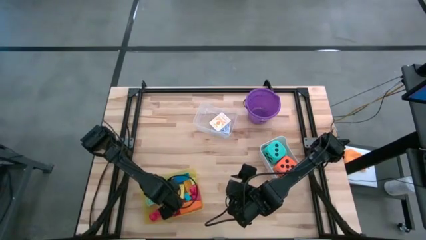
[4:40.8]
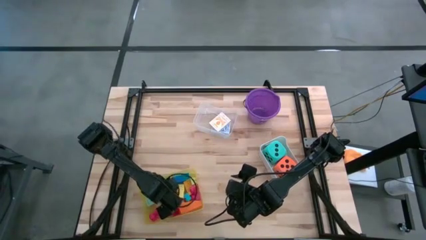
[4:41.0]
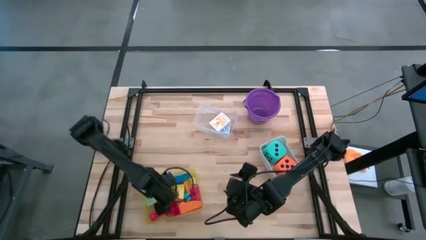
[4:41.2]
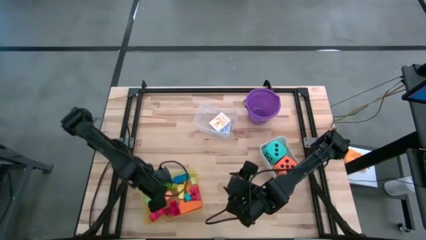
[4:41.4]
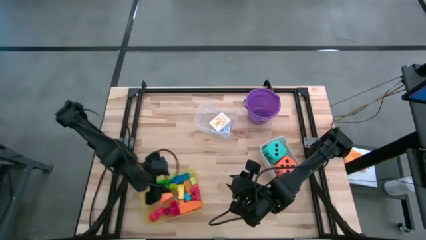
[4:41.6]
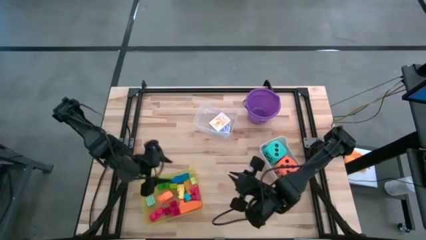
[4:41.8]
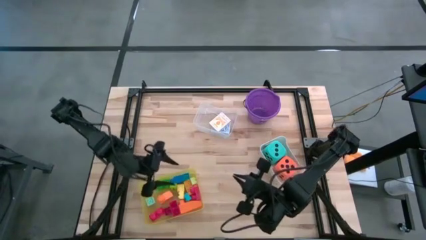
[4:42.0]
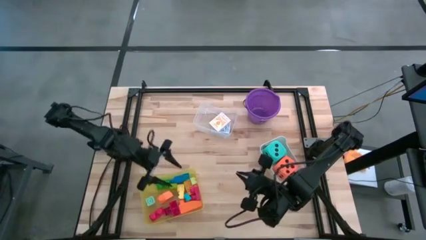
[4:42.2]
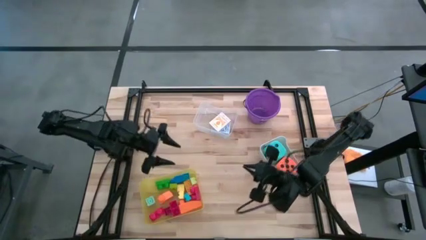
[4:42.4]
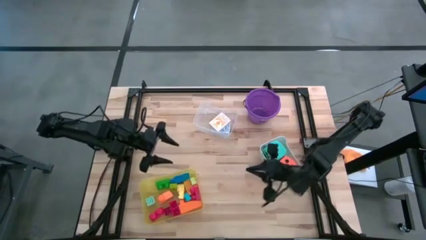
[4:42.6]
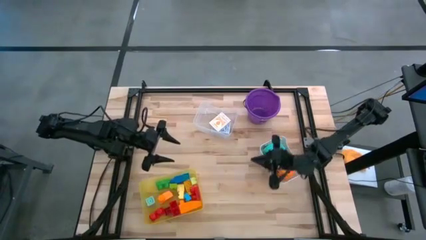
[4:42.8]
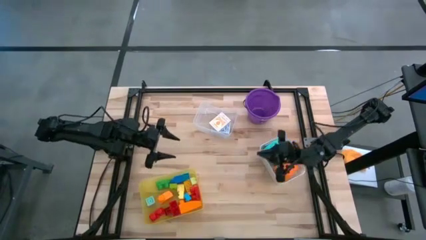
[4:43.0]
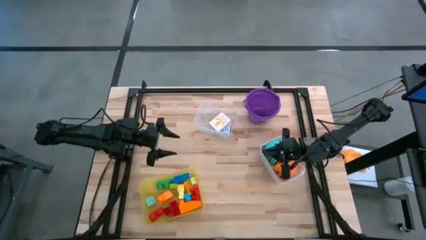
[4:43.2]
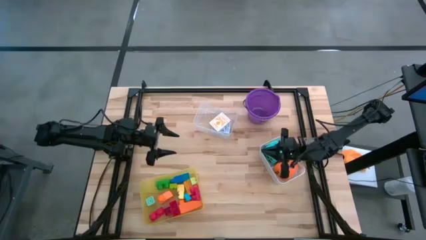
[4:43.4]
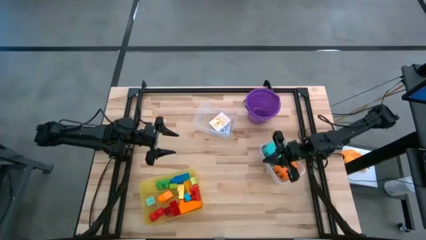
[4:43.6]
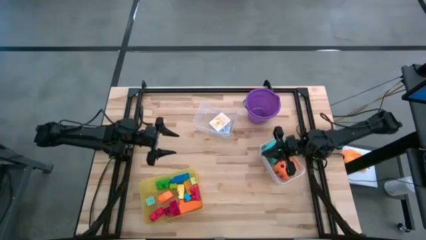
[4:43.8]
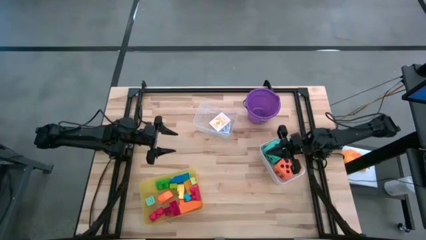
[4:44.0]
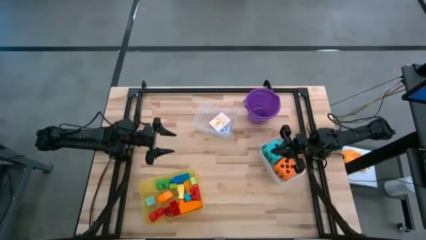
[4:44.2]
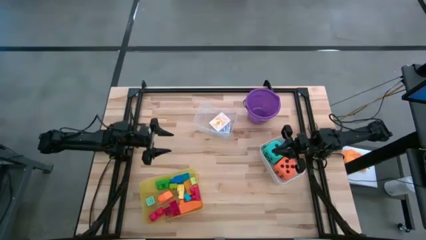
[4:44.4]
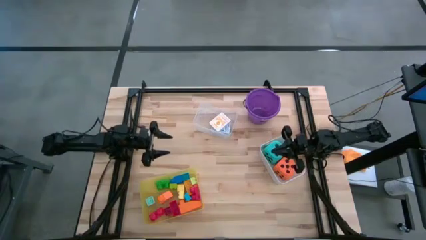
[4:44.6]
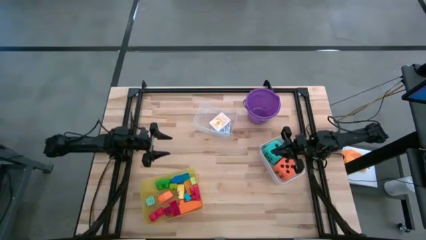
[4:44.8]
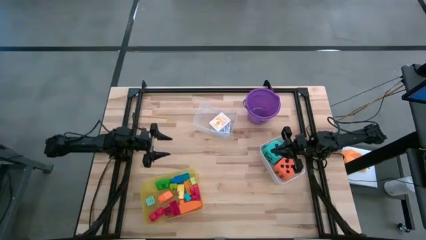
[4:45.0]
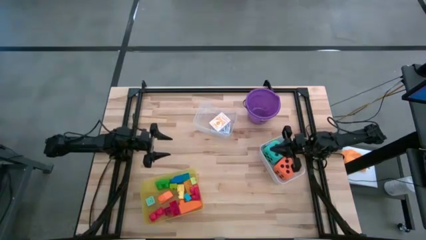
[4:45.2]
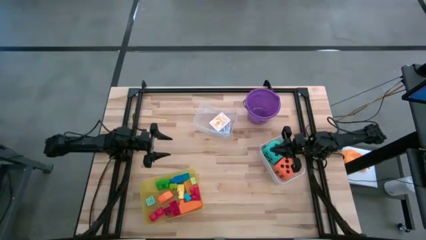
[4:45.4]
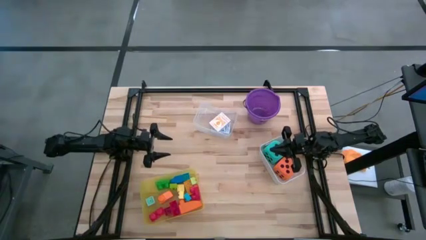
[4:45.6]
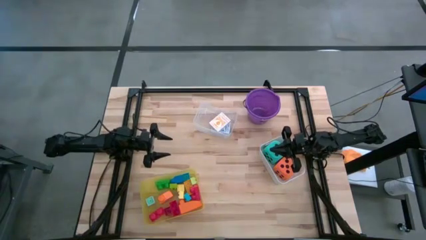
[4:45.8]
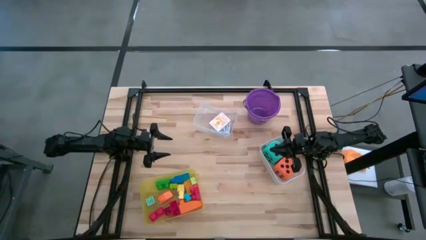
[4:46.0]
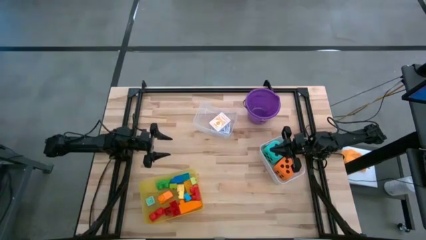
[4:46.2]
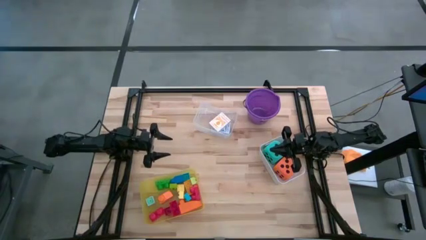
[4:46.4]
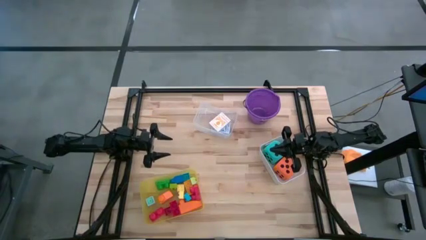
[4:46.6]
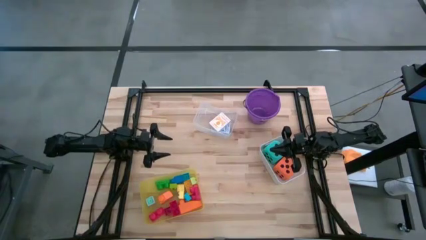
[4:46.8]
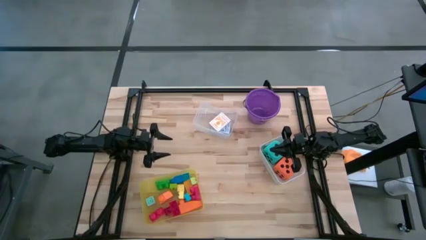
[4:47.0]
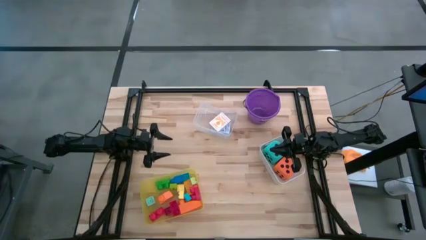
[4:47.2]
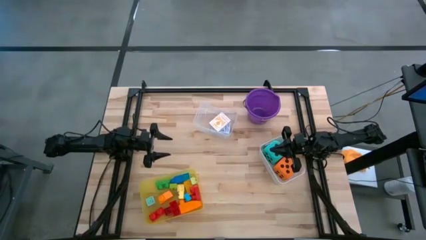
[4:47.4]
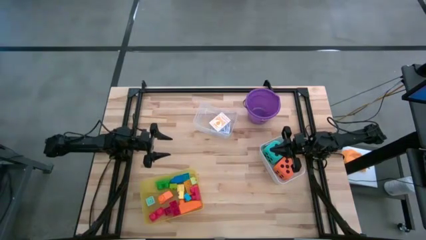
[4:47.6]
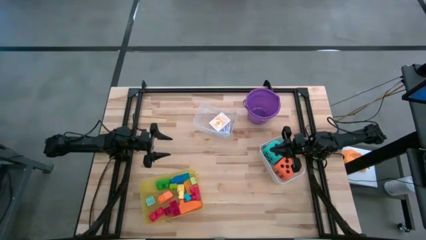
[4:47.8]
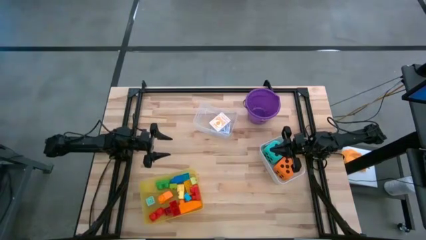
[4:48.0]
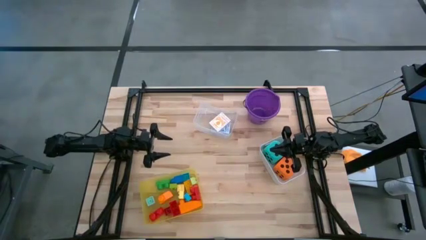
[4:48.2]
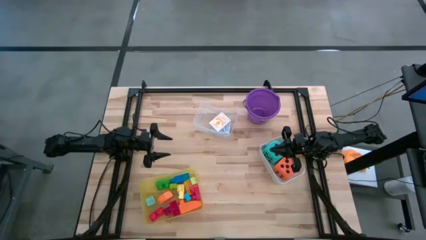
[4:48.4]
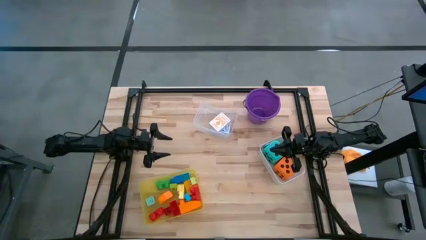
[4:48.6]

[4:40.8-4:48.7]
Task: Pick & Place Toys
Return to Home Position

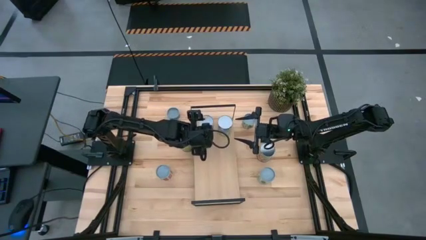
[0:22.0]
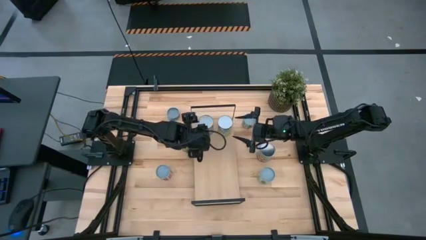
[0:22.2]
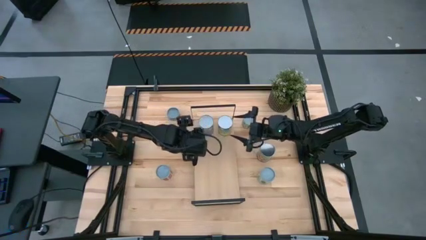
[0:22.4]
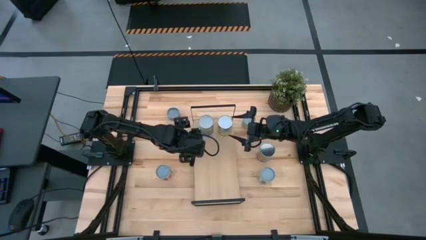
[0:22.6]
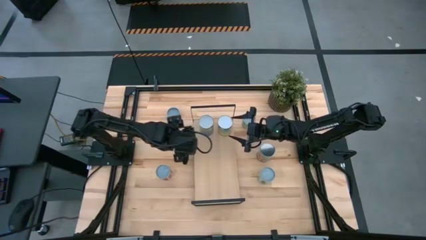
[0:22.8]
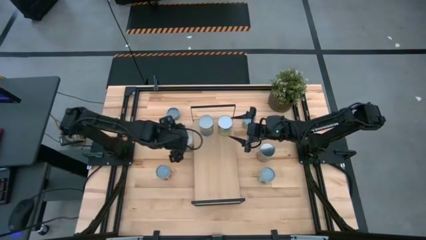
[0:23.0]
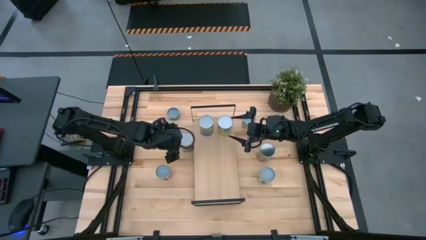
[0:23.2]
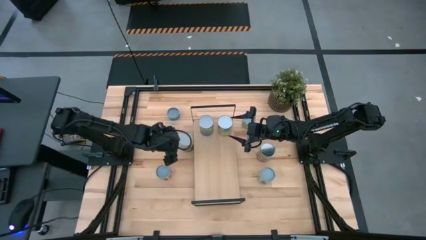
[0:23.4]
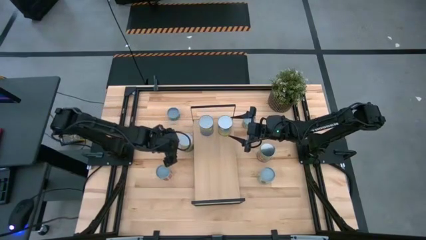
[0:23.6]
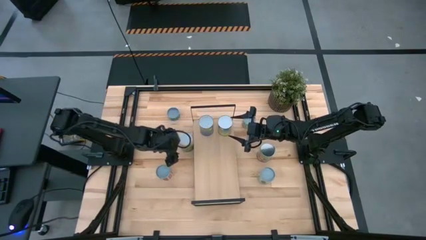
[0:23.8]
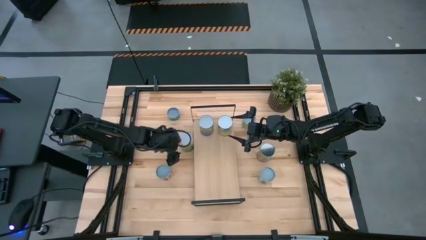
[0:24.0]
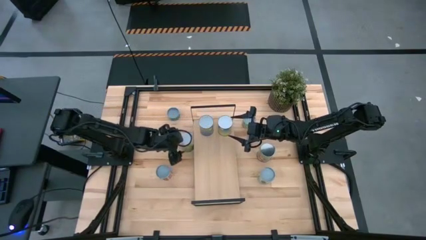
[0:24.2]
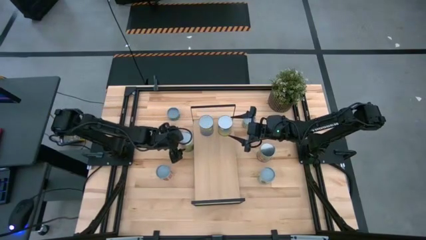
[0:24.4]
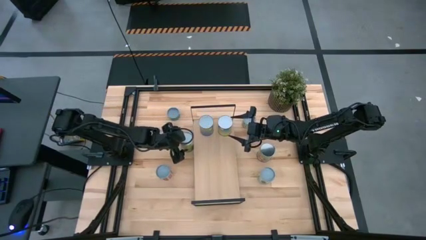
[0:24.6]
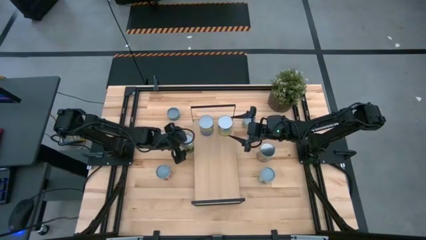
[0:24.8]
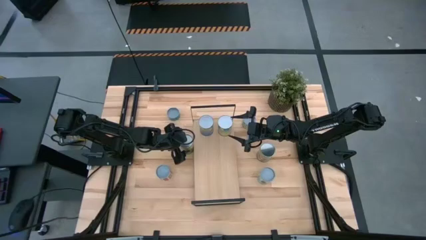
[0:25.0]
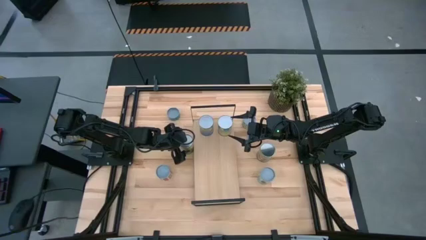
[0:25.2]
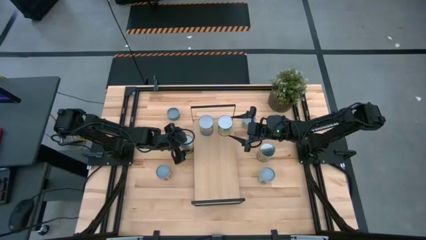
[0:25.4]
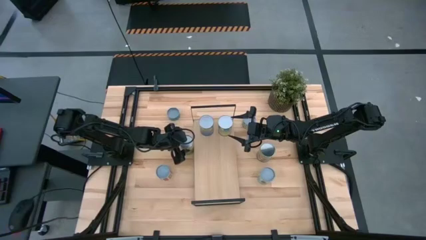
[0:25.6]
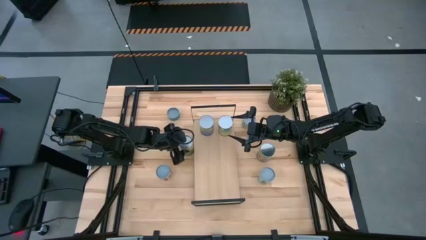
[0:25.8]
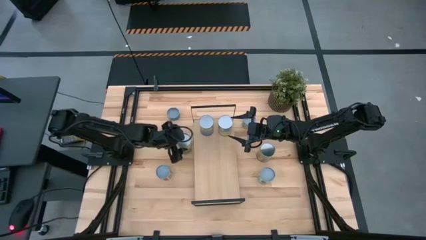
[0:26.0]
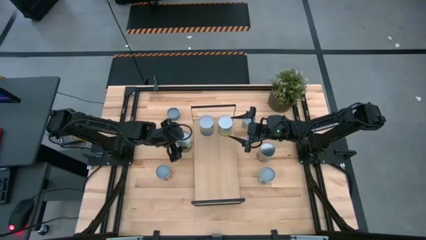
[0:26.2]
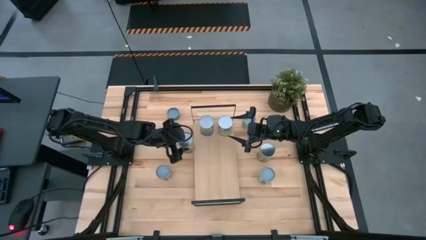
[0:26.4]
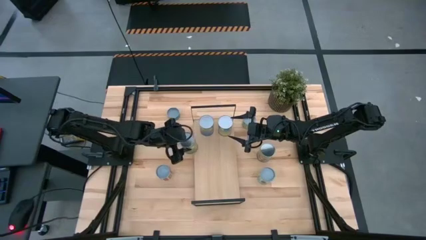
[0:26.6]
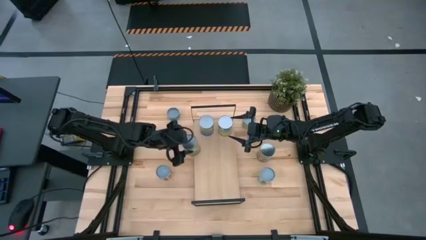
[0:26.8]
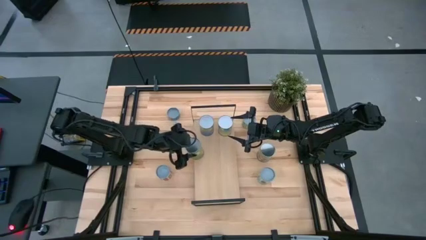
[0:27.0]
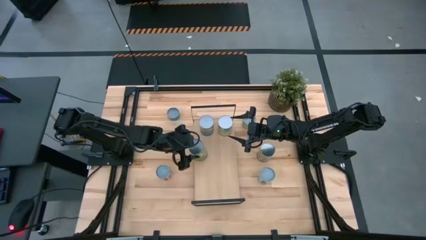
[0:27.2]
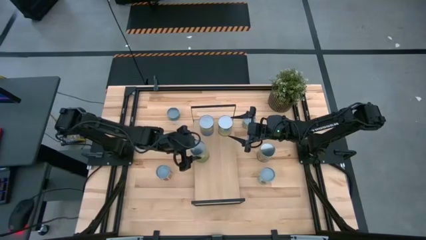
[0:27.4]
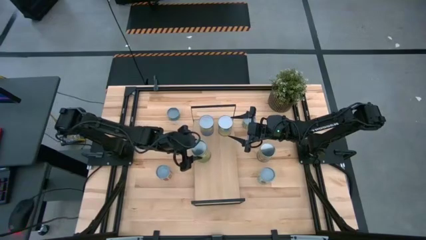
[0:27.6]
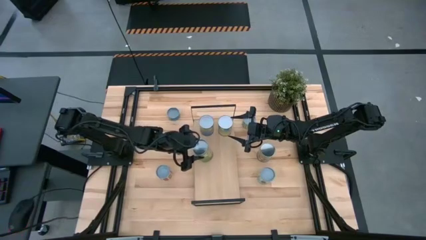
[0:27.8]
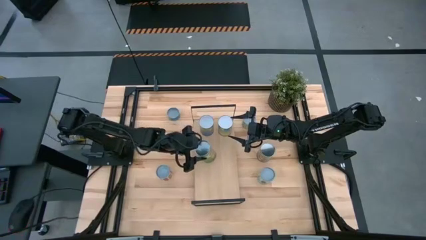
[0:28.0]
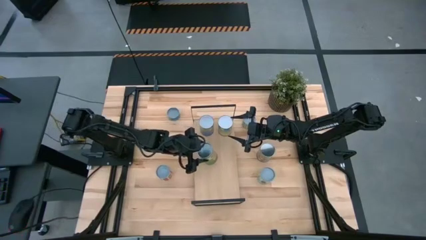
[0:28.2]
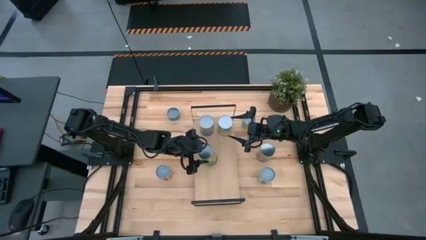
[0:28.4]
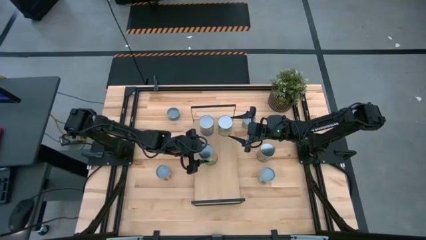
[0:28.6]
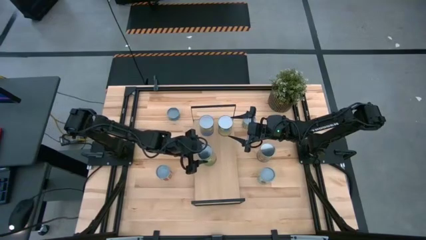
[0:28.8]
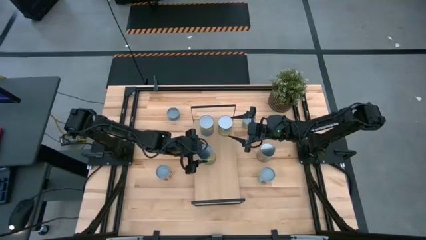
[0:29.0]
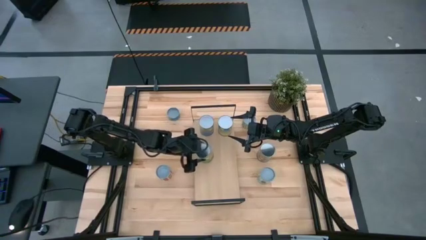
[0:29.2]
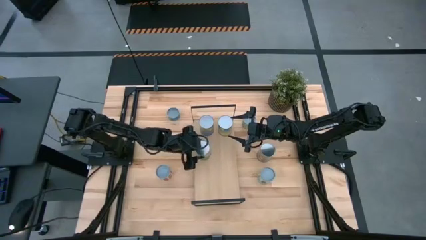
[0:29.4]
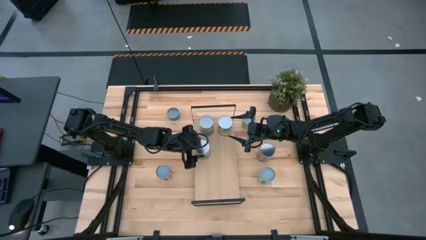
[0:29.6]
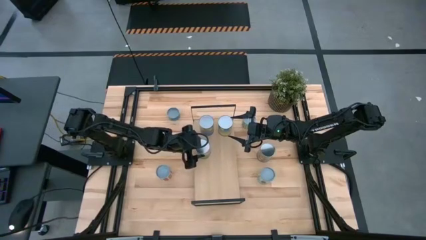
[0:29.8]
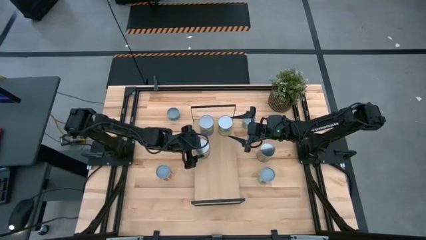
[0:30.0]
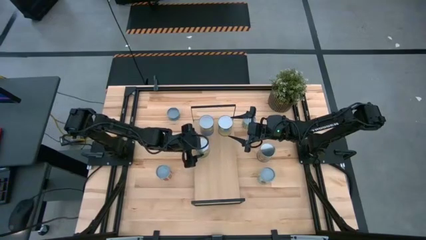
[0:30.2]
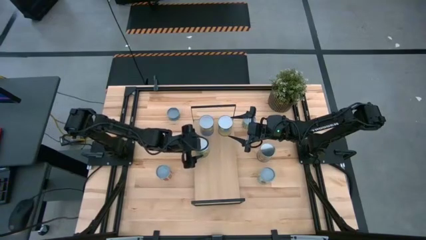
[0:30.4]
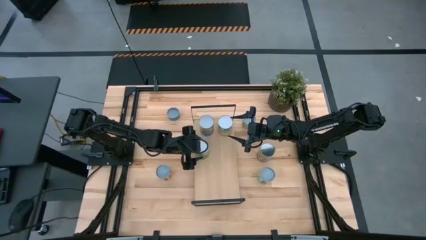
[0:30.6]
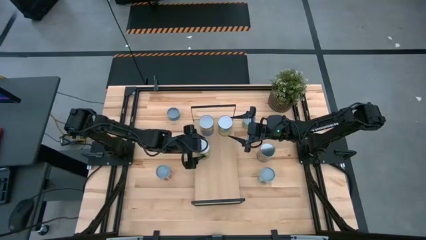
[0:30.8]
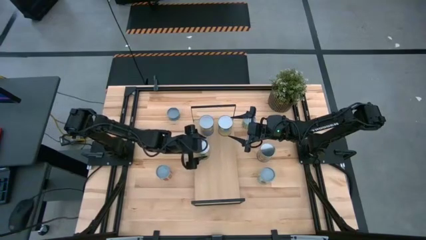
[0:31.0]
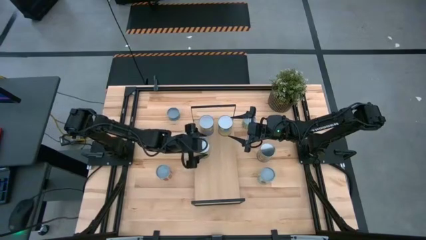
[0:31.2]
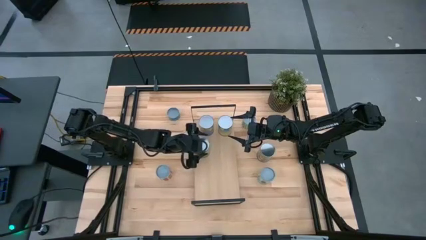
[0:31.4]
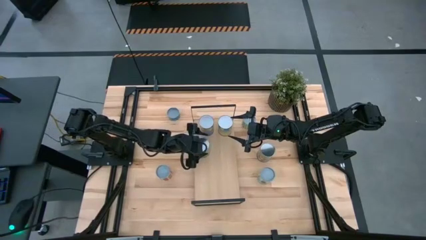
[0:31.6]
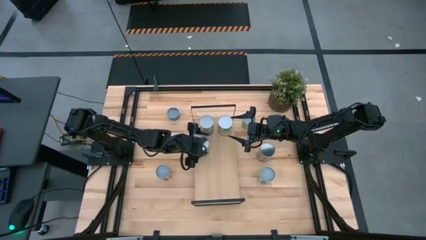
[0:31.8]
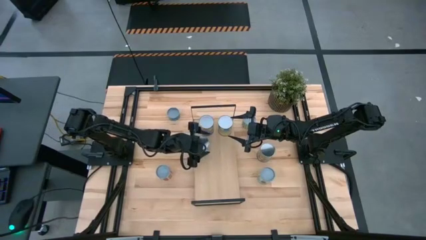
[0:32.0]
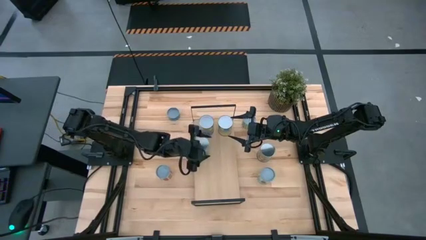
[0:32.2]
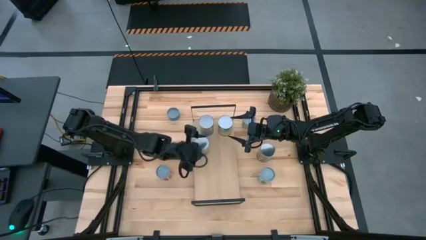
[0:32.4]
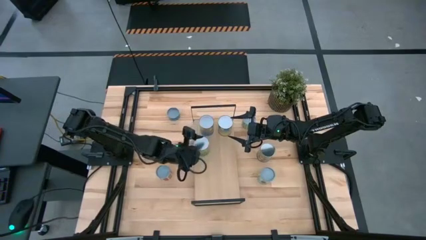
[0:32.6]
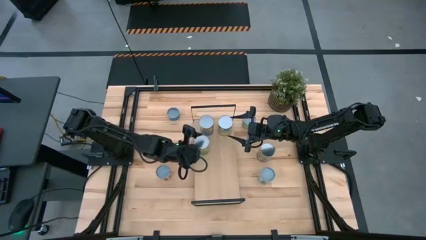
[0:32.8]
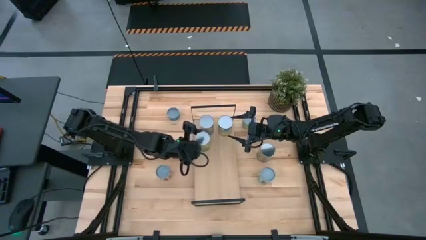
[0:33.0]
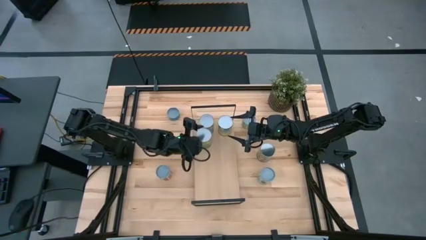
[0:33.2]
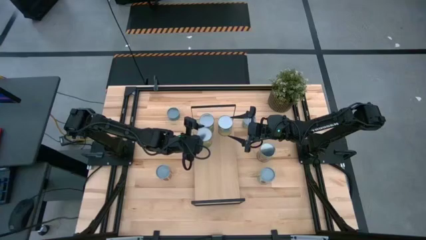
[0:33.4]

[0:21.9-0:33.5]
Task: Pick and place cans onto a shelf
Put the canned oranges on the shelf
